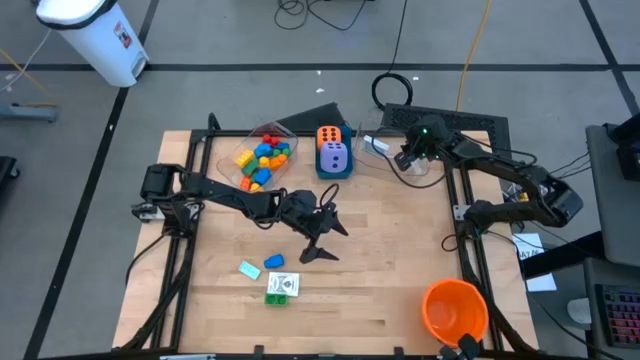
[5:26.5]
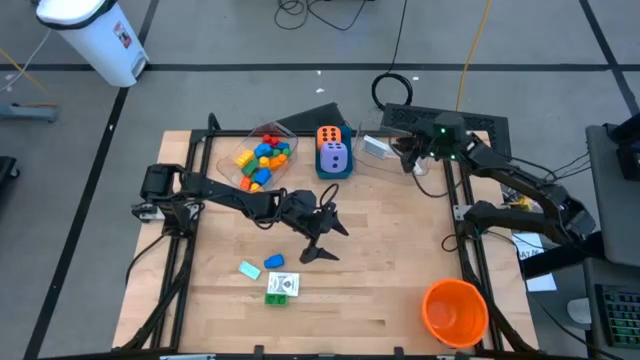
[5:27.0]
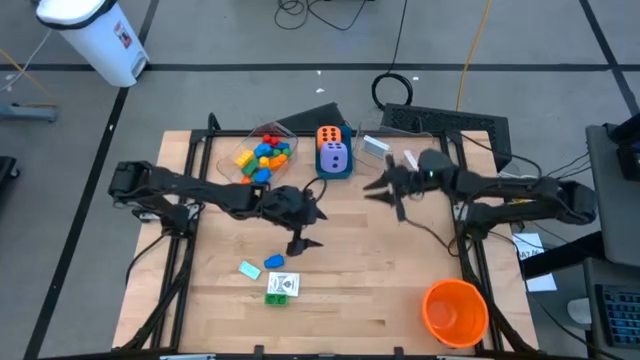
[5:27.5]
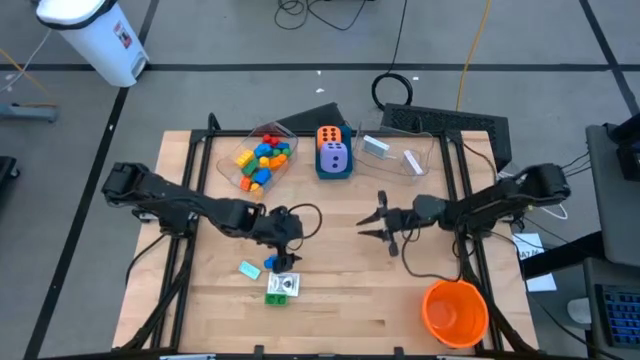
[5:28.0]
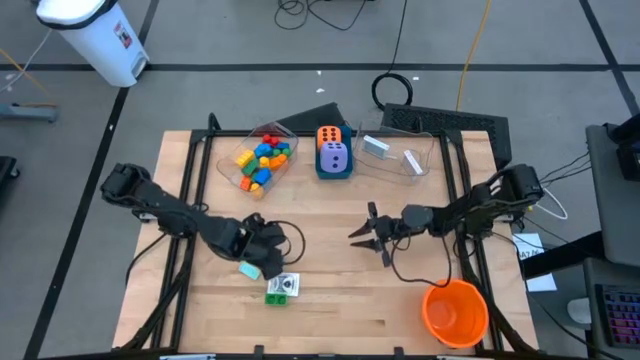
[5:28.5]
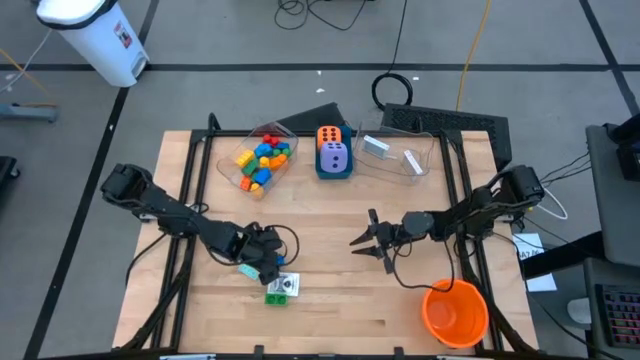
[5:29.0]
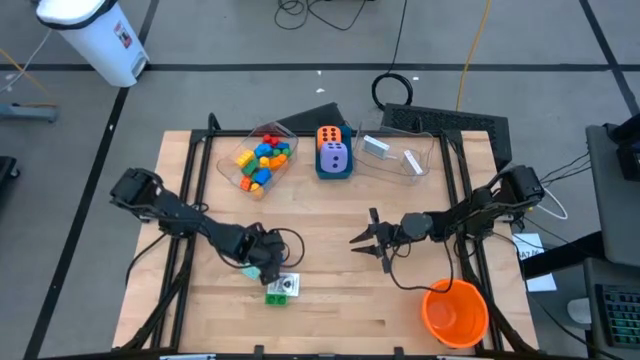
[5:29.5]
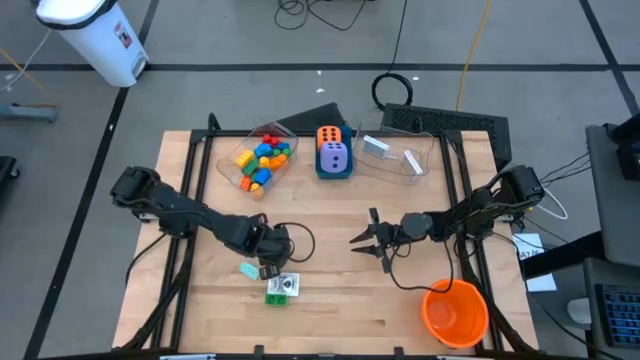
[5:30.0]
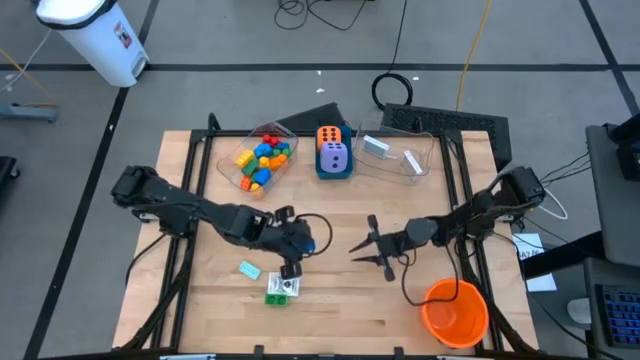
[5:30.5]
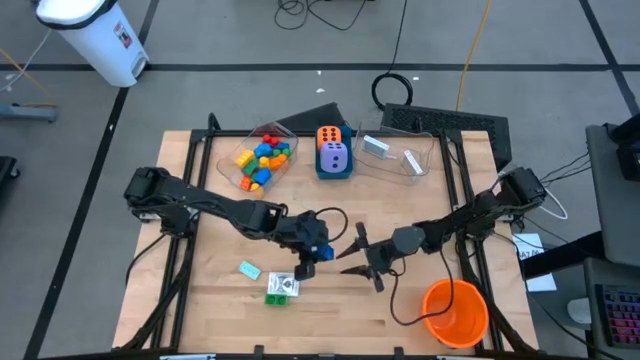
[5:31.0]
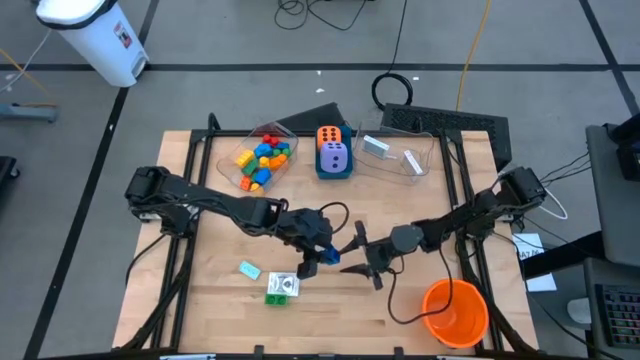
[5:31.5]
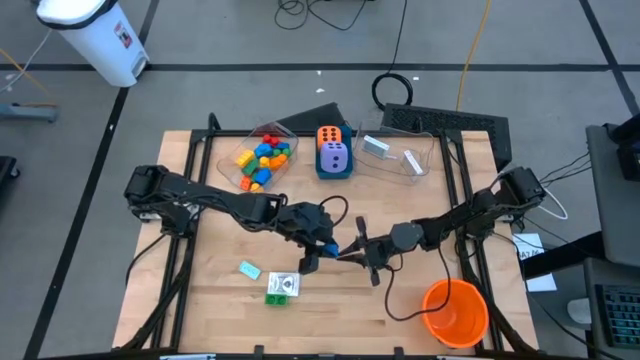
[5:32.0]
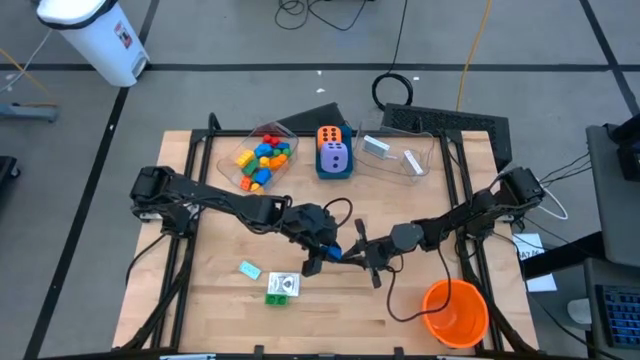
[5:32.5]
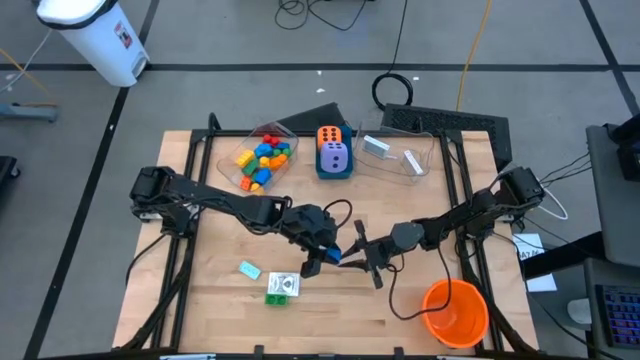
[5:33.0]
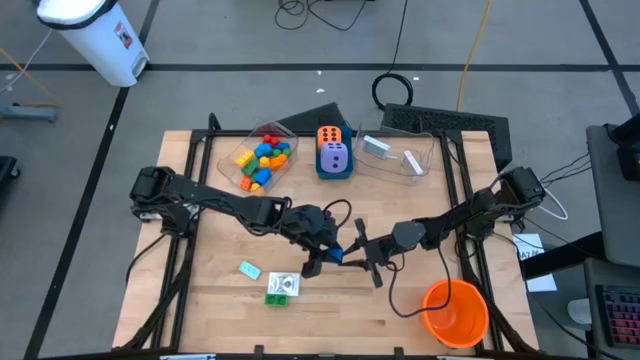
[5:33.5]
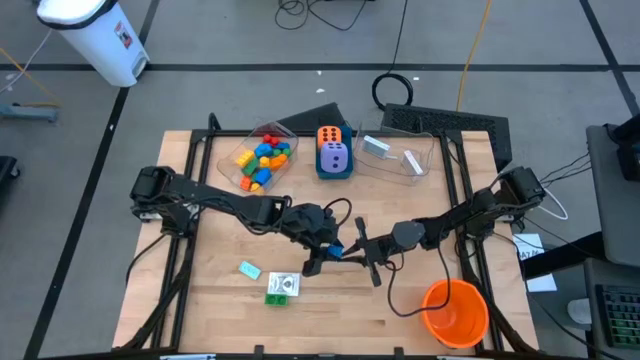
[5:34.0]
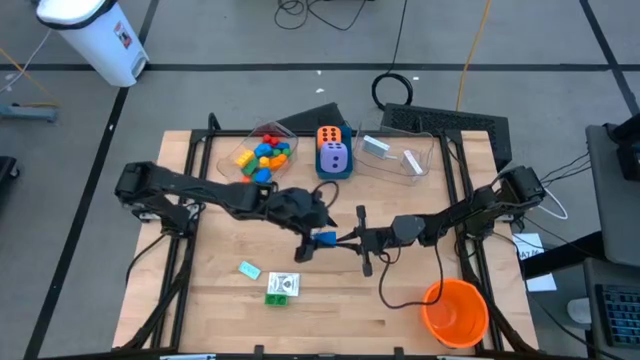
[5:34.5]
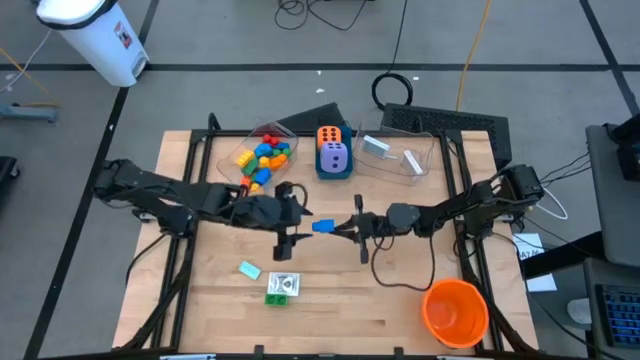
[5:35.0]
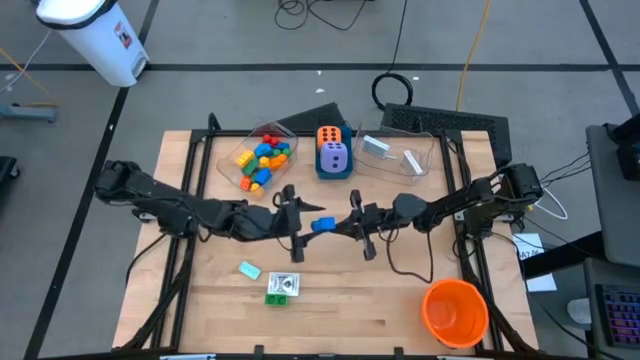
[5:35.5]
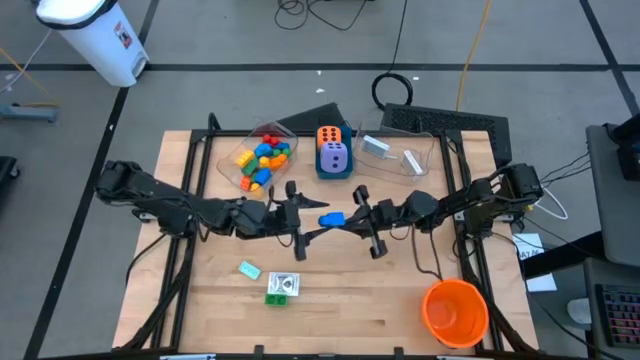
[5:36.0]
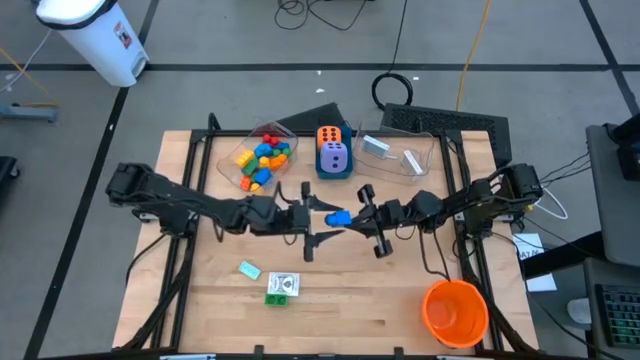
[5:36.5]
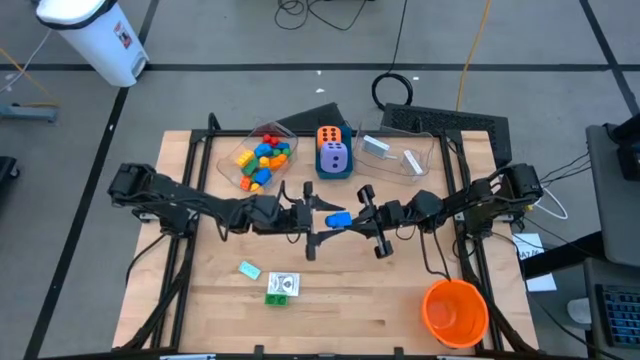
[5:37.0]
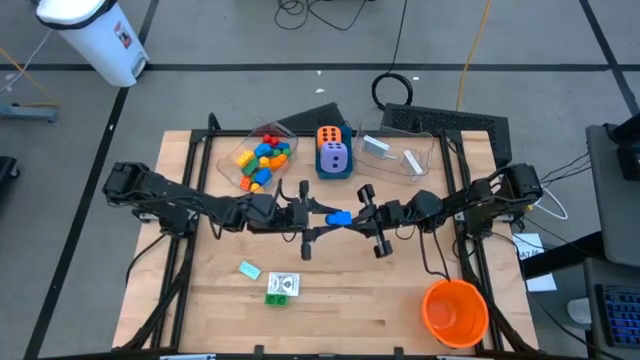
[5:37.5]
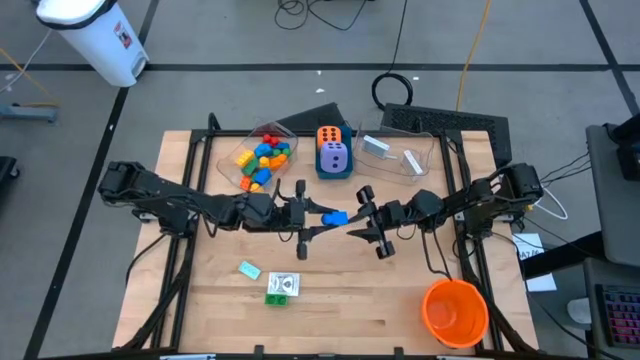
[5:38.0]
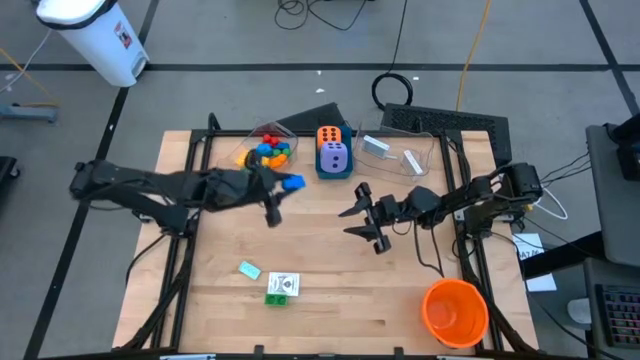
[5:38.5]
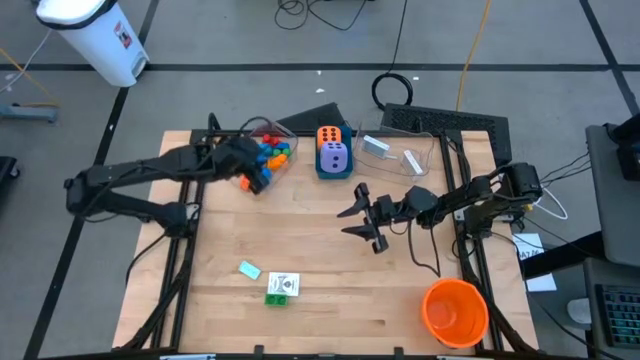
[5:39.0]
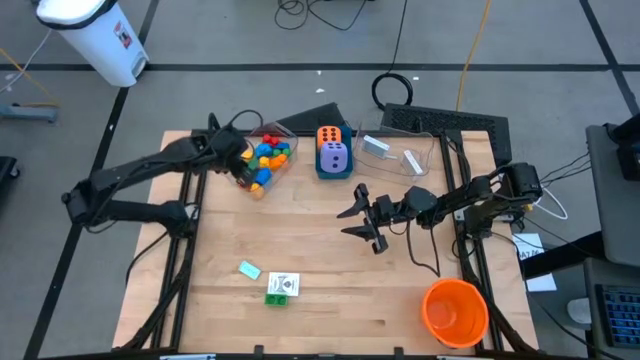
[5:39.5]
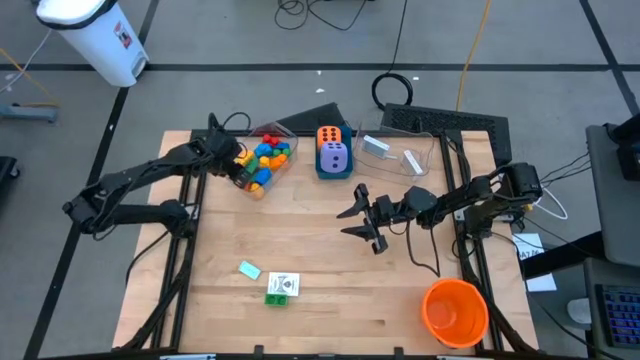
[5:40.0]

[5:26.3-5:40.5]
Task: Pick & Place Toys
Put the blue game piece into the left transparent bin

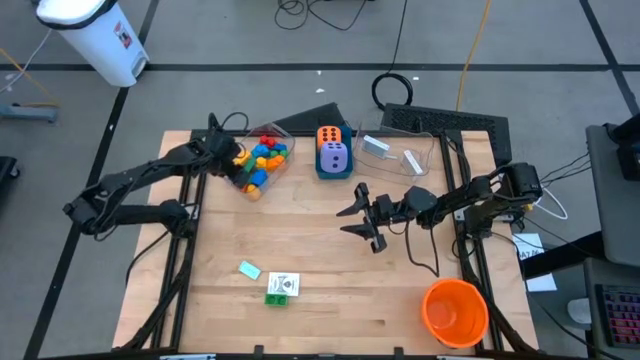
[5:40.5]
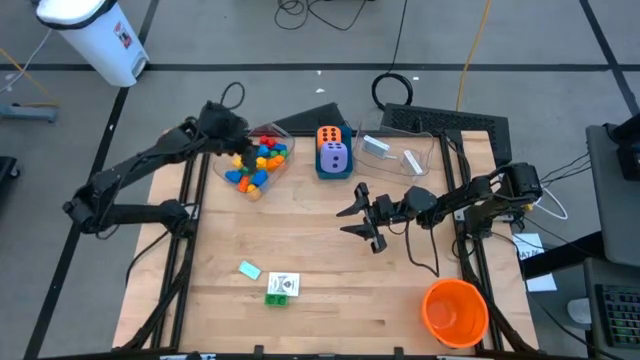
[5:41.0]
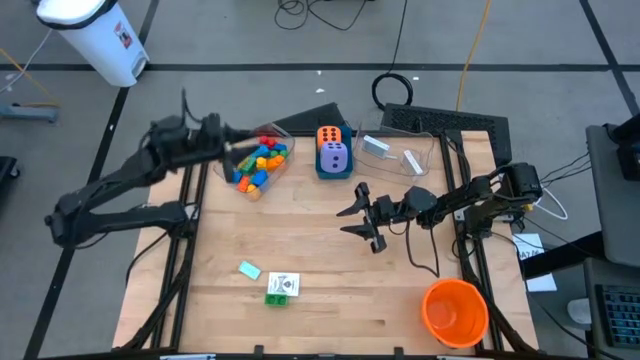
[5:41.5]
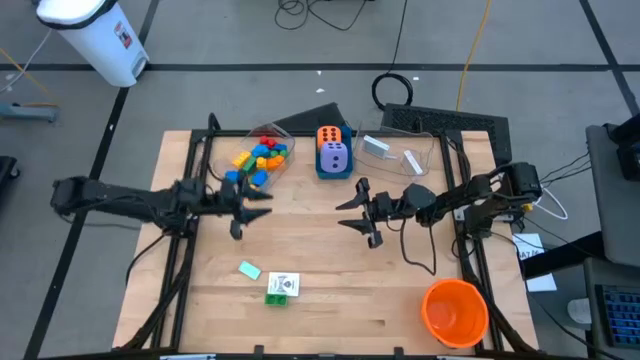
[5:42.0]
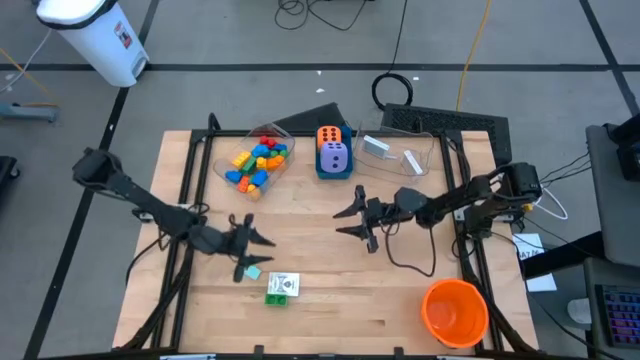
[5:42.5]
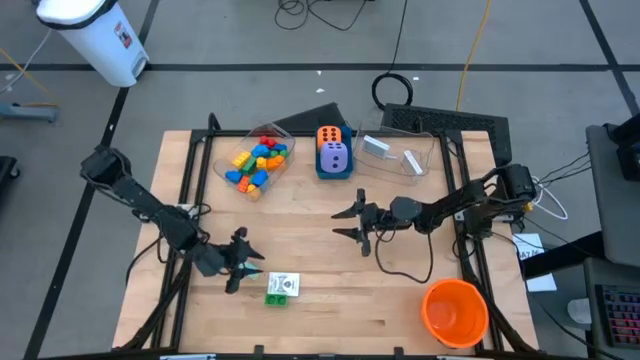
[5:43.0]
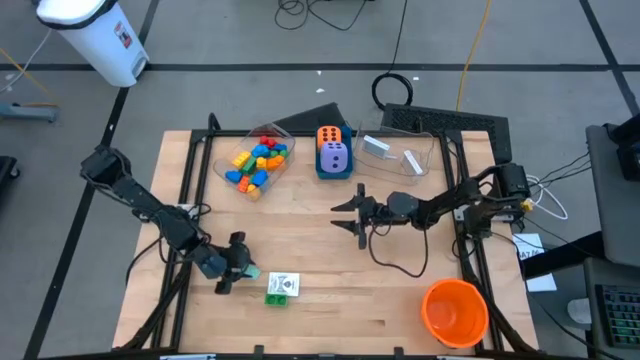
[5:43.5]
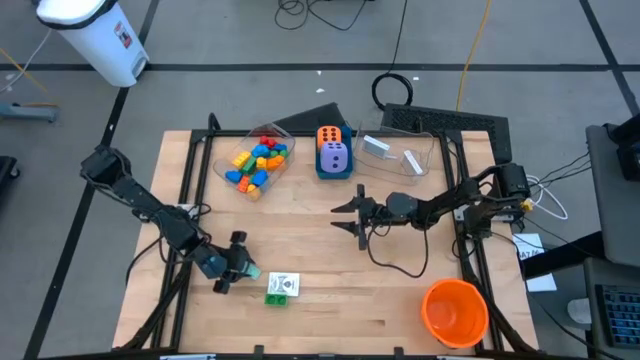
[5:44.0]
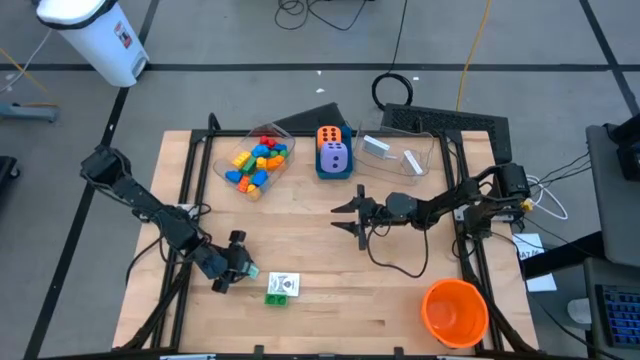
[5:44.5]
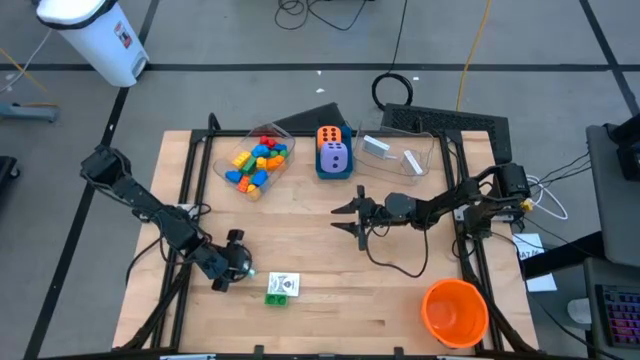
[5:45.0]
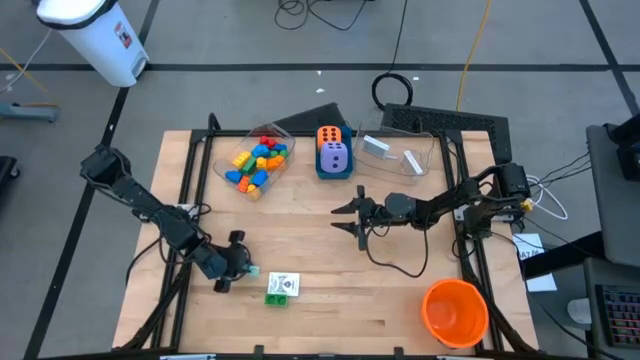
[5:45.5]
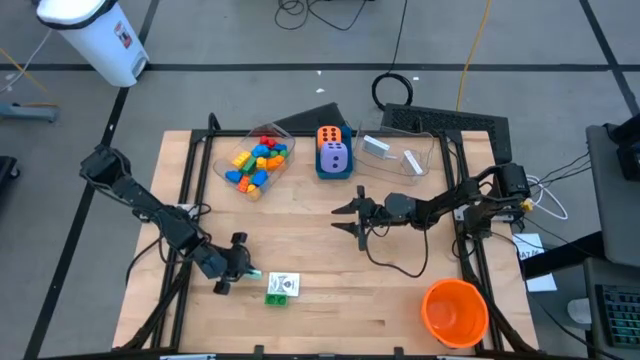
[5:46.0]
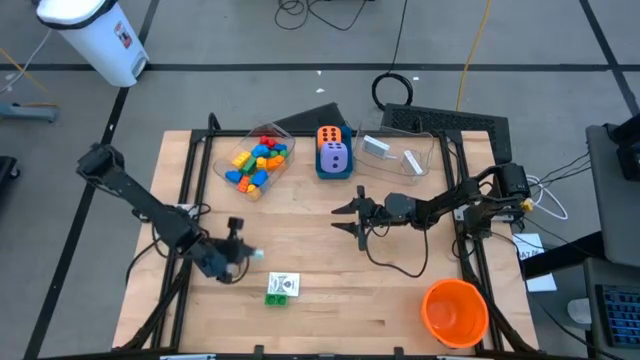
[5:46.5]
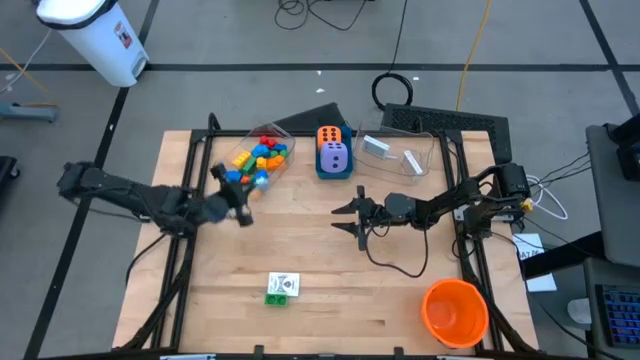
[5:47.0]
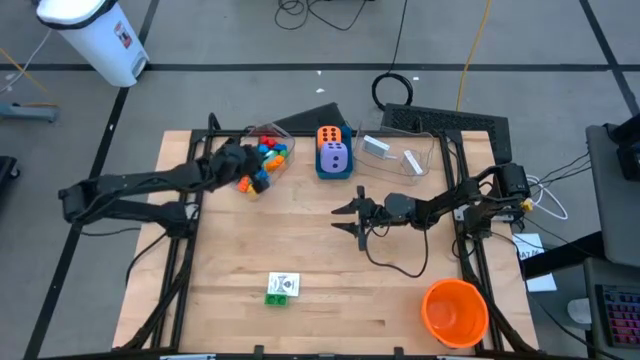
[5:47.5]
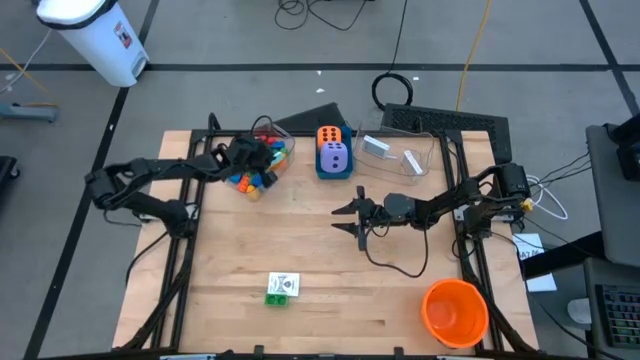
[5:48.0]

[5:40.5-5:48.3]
Put the light blue game piece into the left transparent bin
